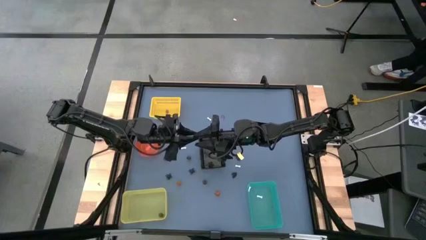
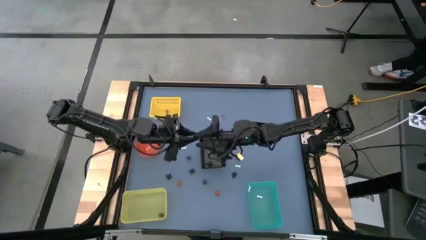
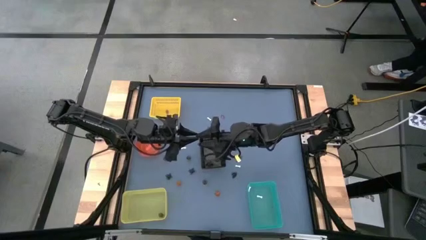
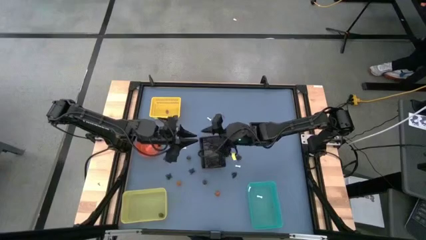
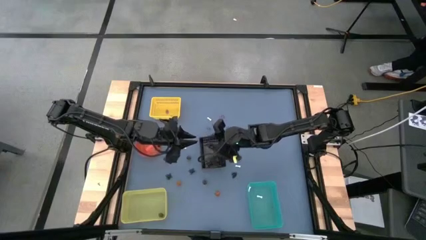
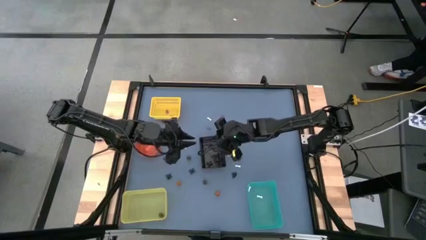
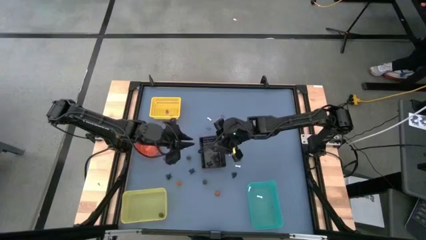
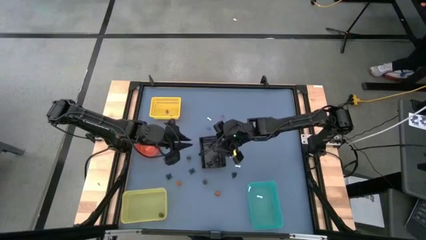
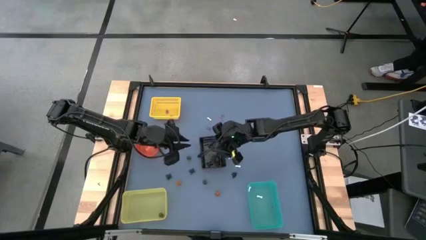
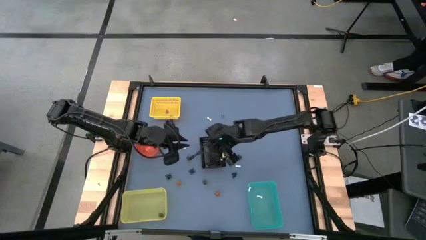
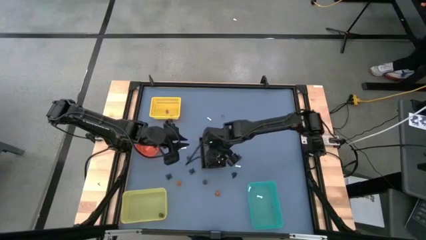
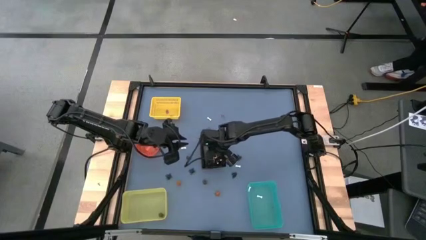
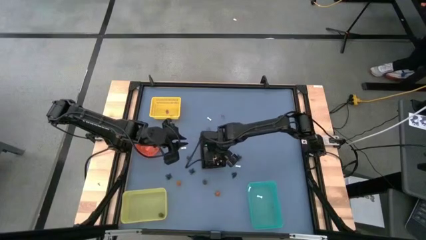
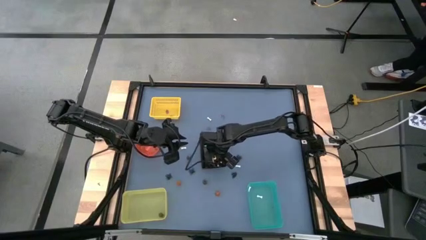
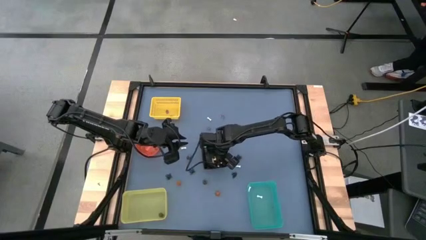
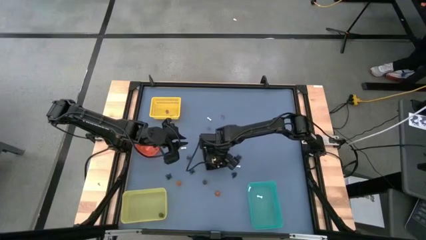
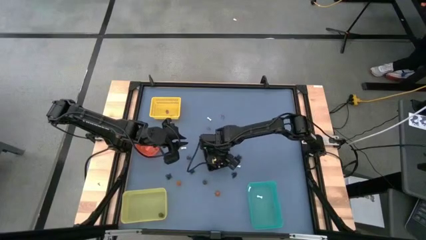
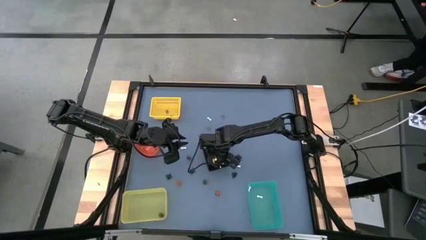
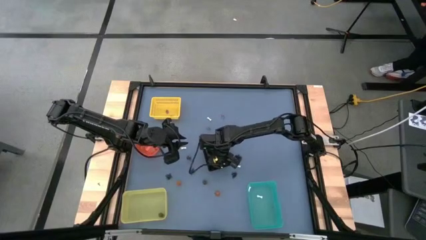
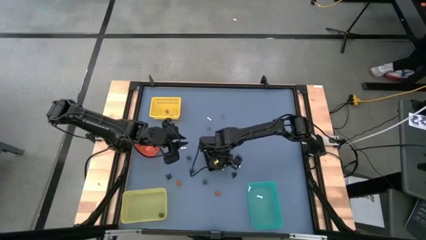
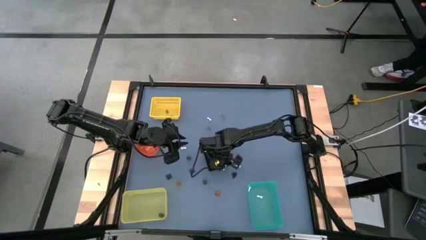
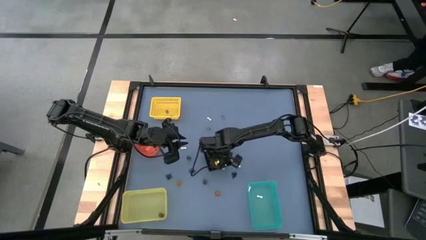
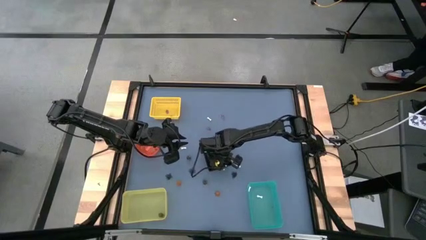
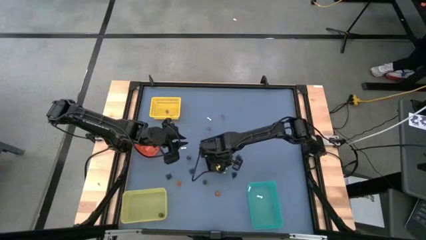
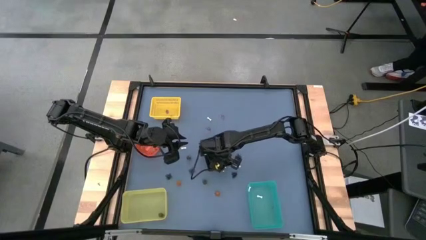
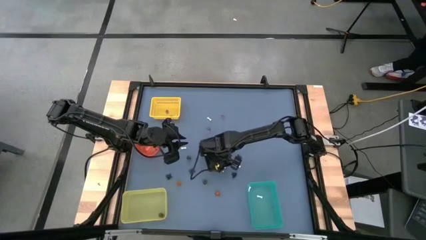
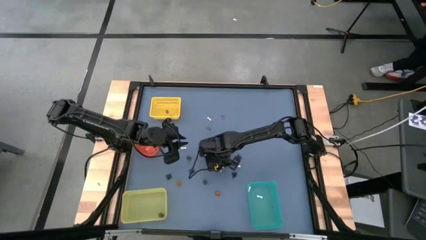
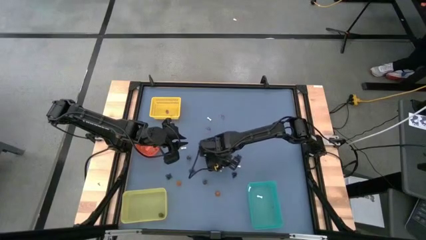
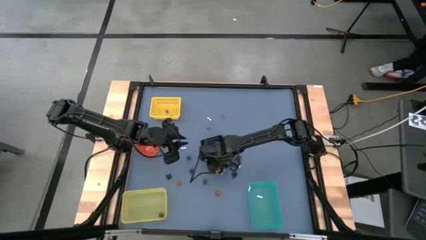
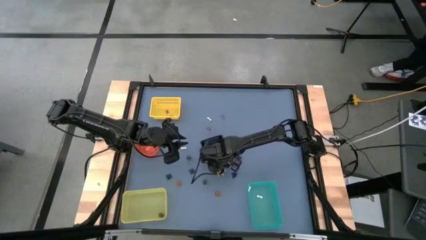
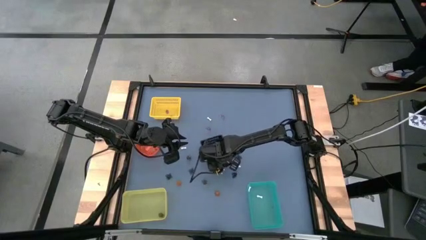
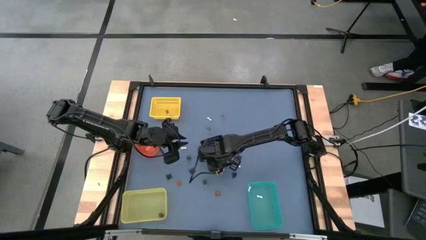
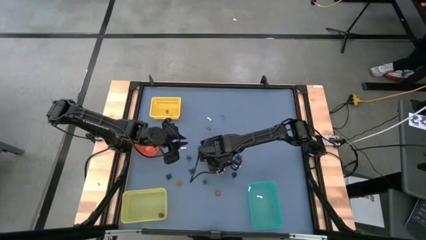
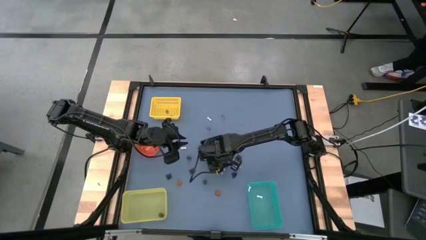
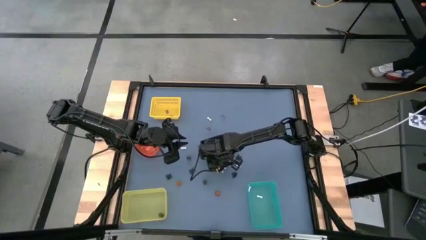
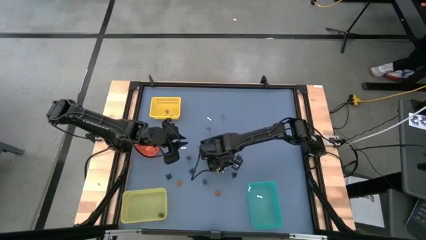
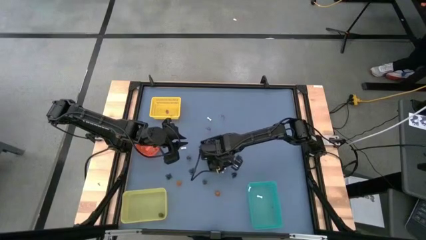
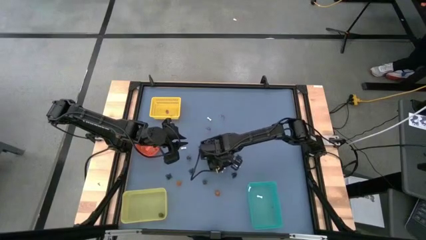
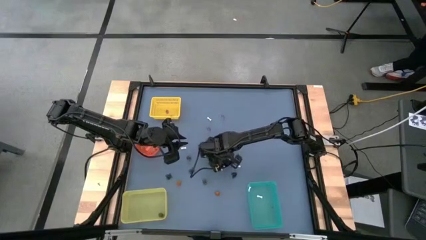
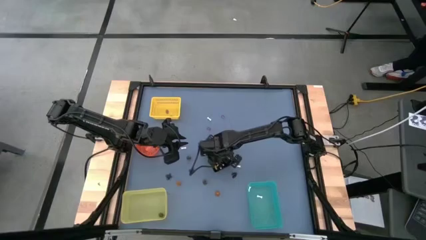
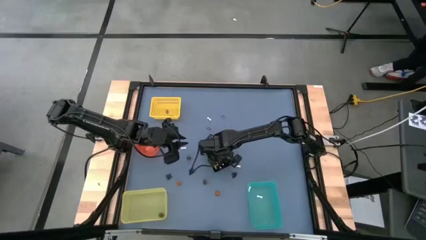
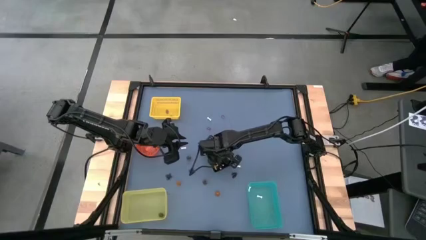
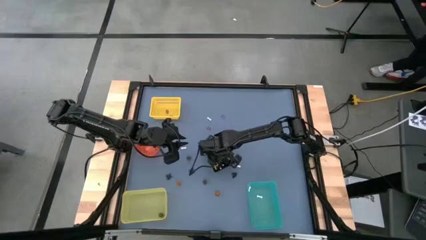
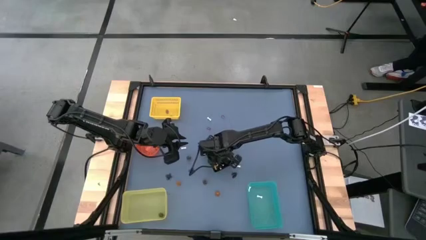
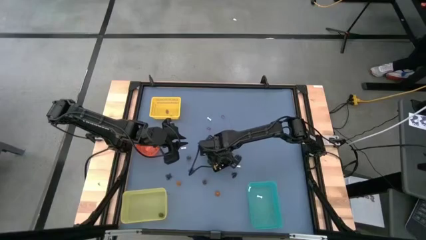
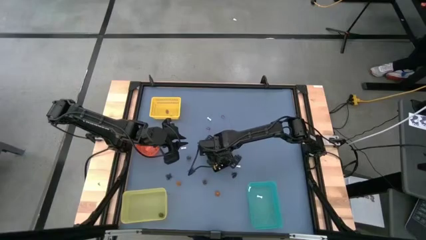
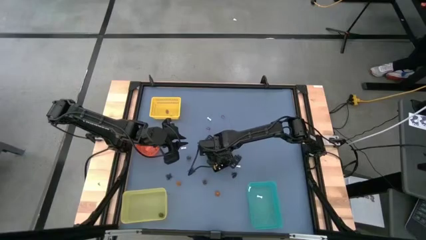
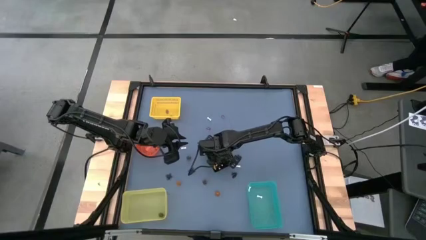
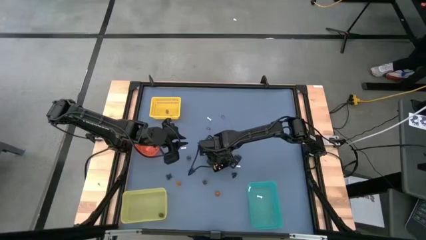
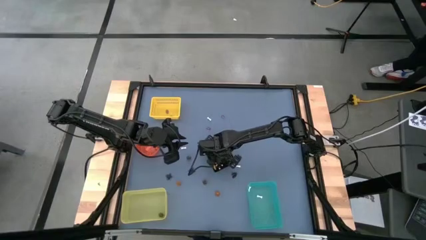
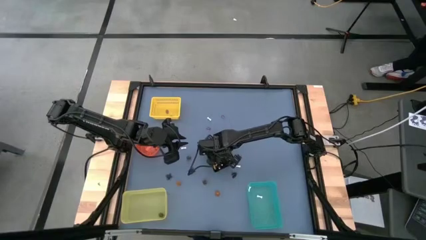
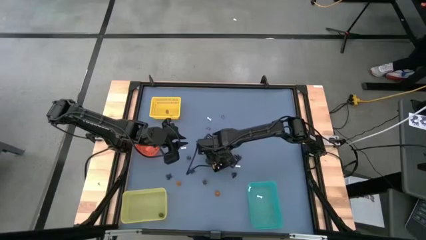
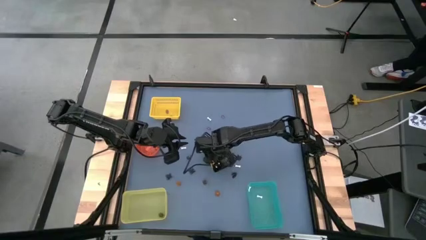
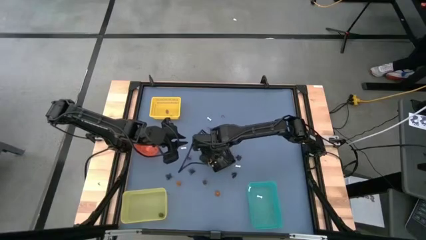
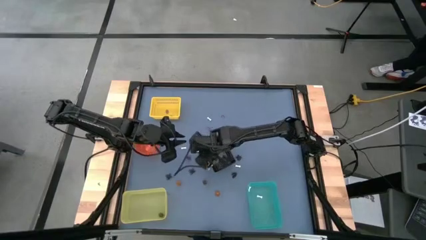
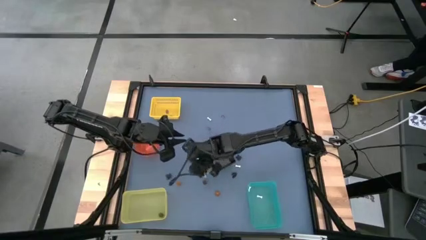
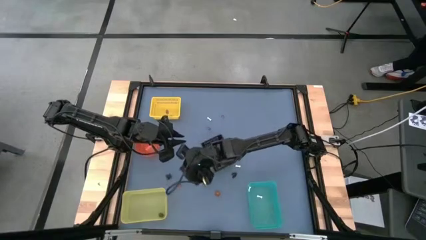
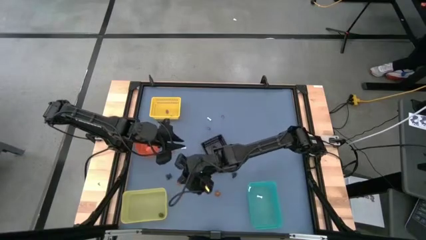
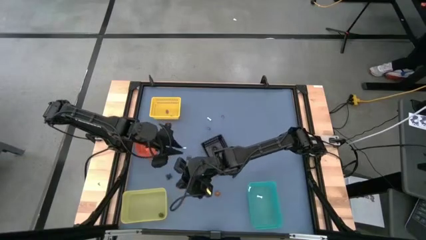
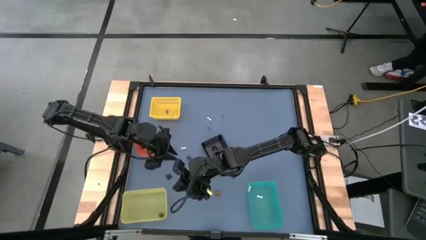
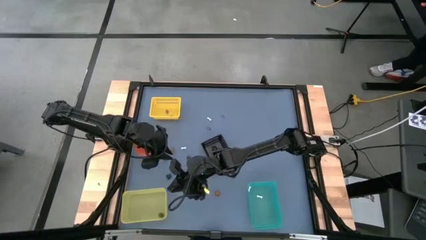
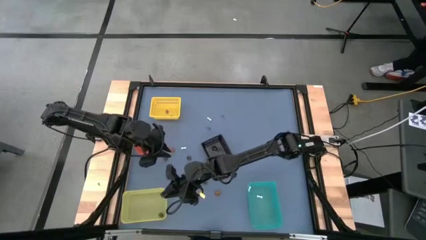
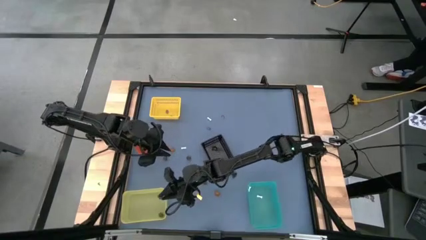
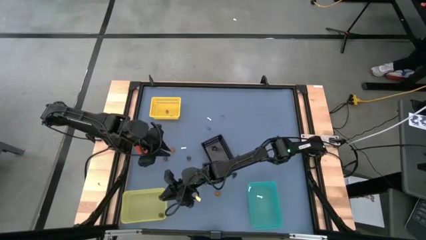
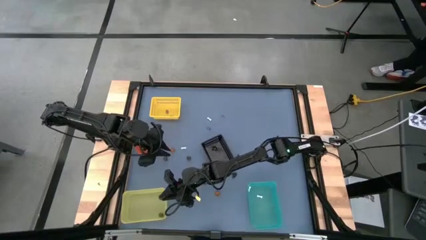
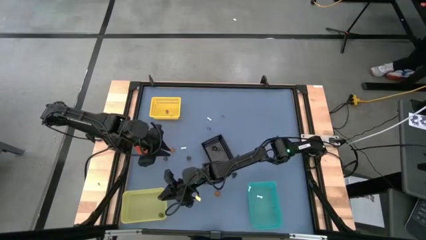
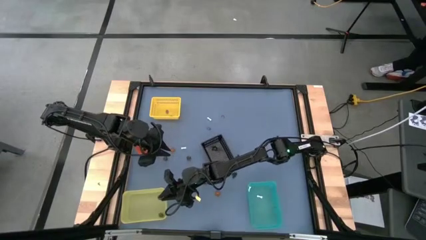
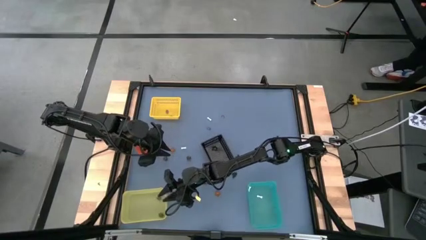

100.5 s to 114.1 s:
Task: Sort Halloween decoration
Put the black skull toy into the bottom yellow bin
